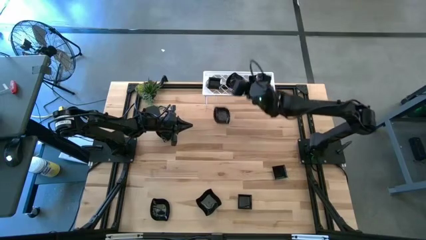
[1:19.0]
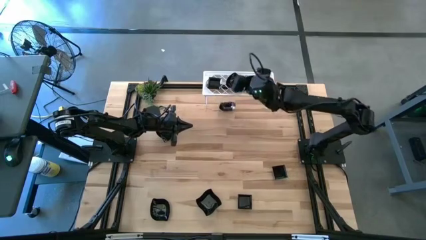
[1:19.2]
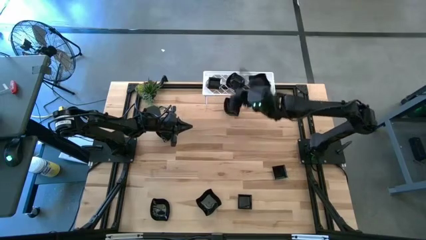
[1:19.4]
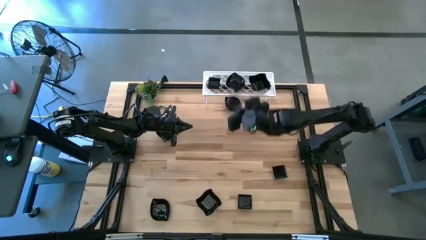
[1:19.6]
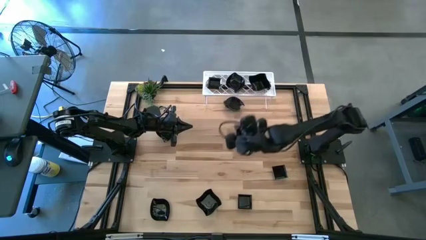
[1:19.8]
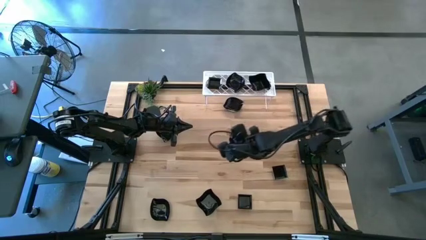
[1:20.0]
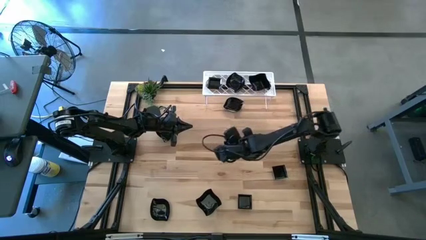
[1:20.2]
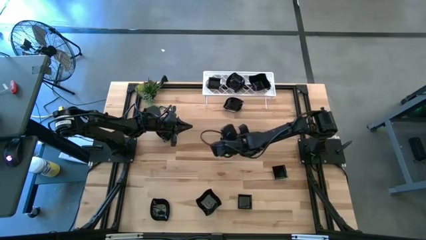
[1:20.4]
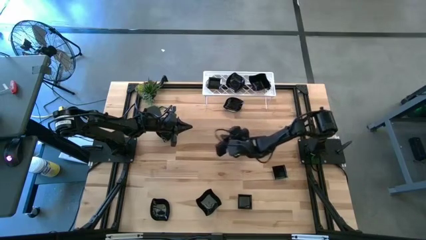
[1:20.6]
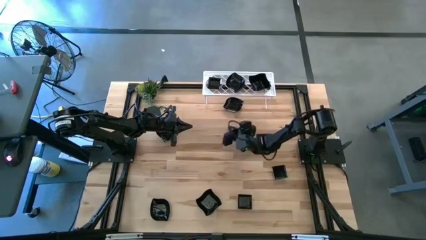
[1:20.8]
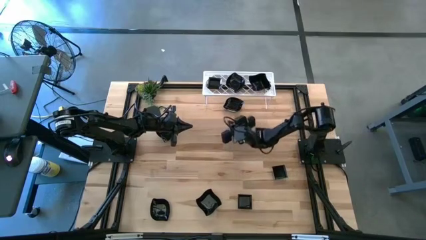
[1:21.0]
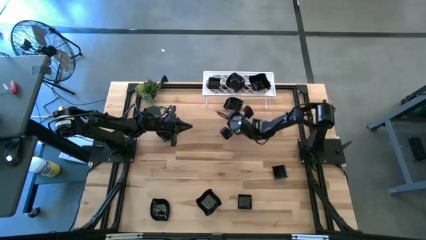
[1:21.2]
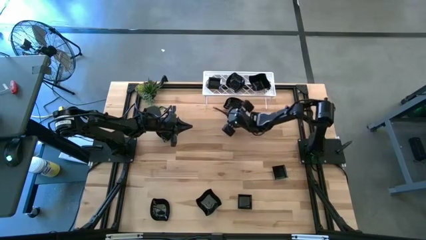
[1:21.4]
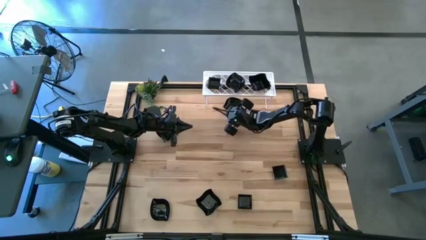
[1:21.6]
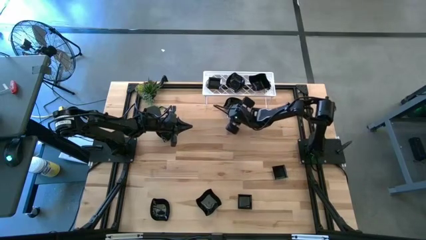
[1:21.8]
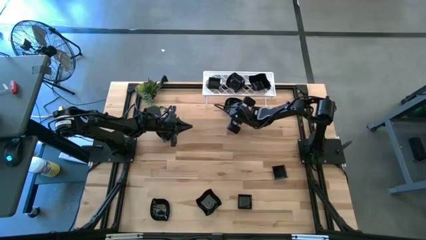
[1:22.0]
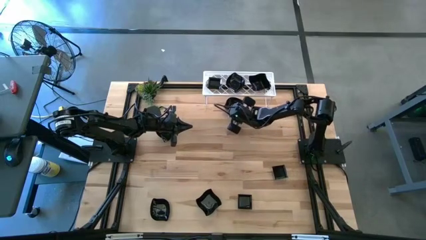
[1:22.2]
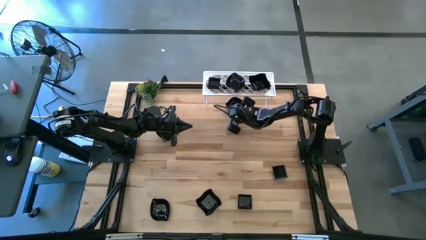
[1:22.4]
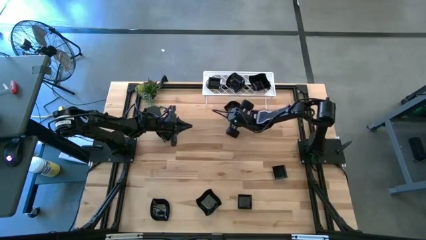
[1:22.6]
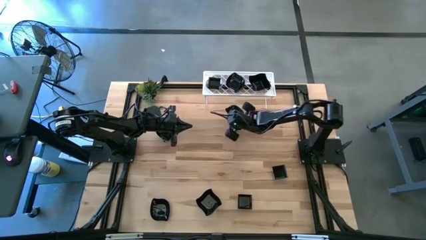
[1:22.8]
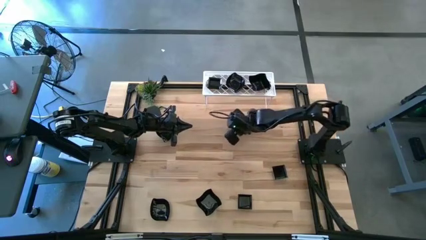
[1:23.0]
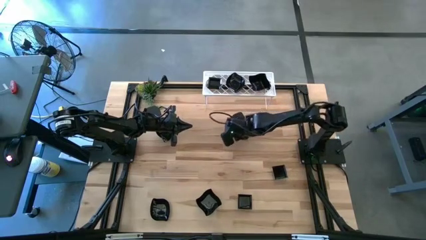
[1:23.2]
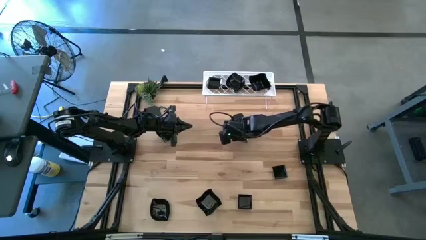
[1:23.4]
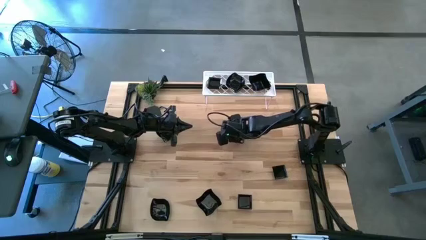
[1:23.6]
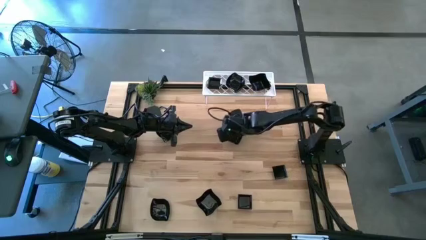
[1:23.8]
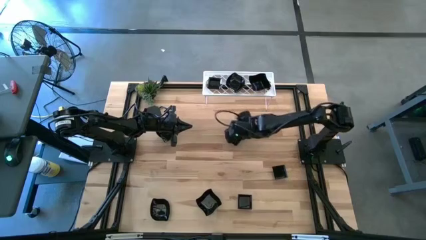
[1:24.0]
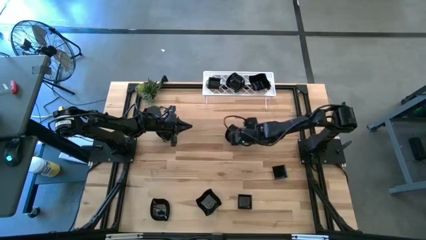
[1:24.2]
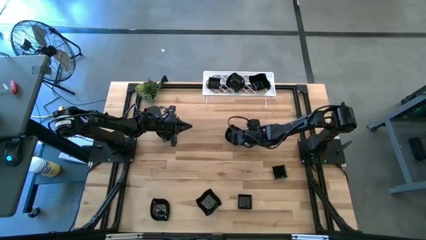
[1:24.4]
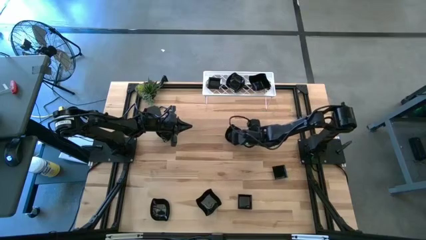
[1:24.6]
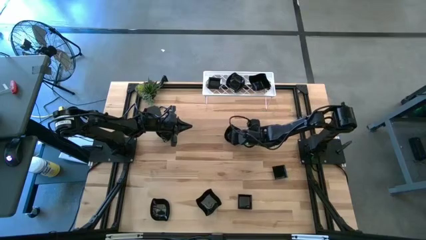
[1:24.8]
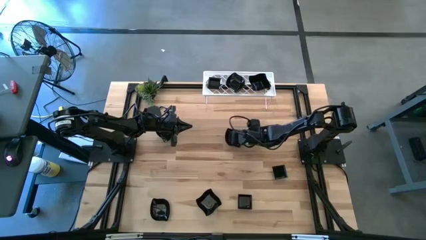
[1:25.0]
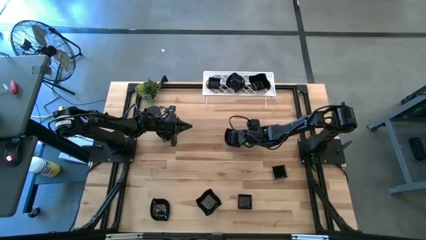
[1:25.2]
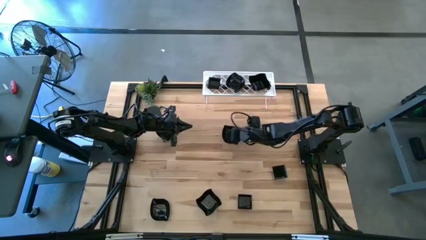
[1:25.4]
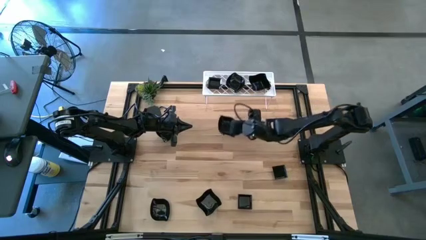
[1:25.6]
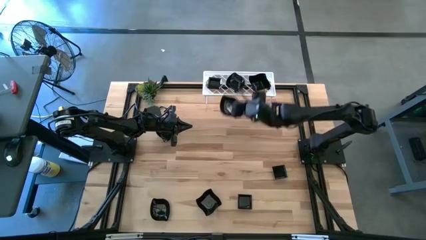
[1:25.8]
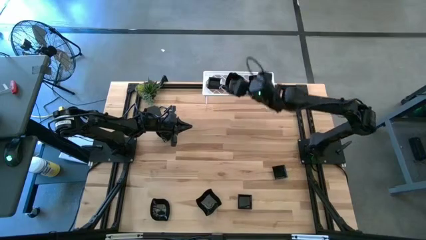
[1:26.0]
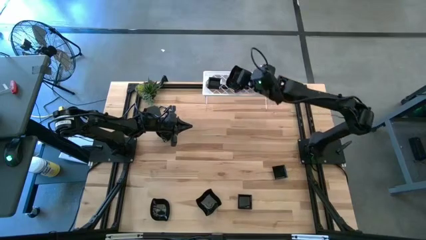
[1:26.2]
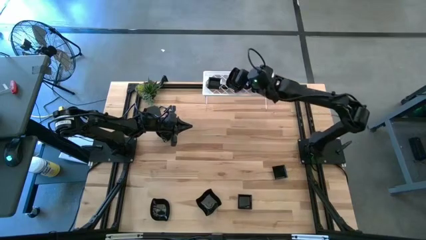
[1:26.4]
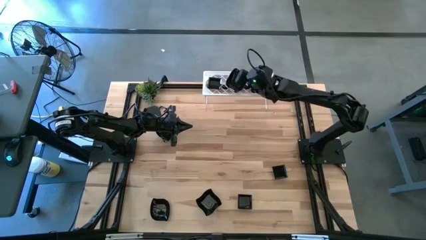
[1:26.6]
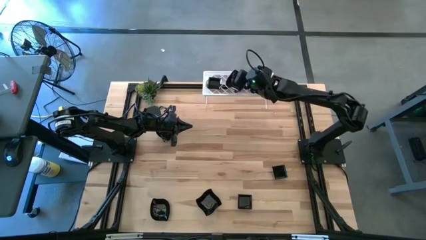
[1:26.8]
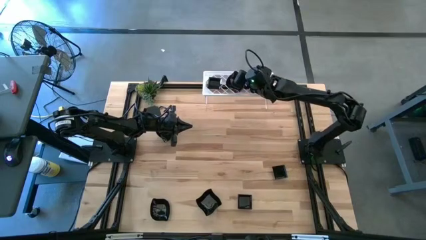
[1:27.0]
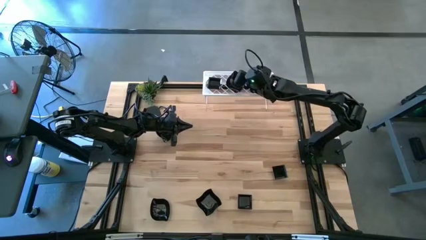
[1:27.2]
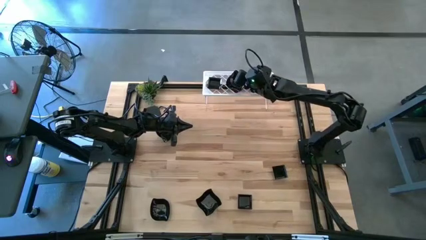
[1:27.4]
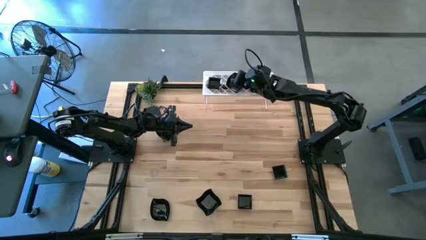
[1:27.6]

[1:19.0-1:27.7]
Task: Pick & Place Mini shaped plates
Stack the leaf shaped plate on top of the stacked leaf shaped plates on the shelf

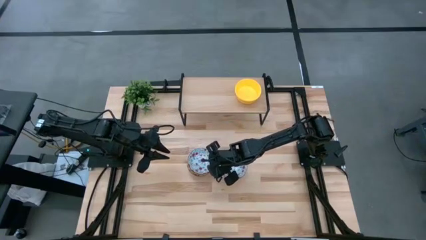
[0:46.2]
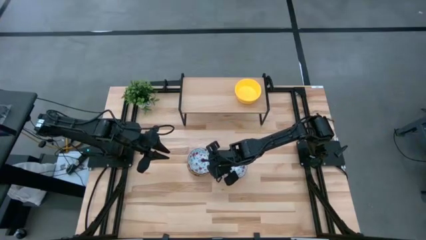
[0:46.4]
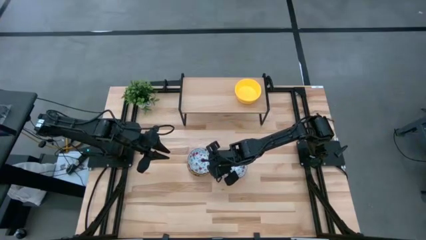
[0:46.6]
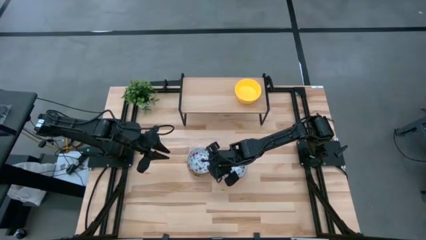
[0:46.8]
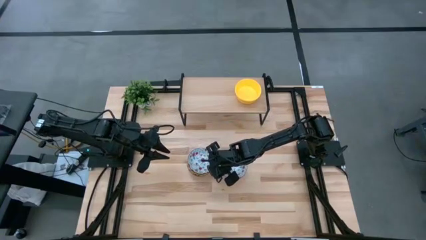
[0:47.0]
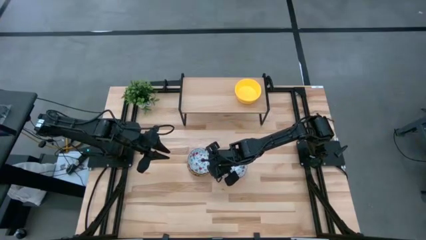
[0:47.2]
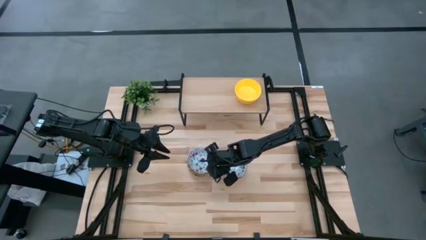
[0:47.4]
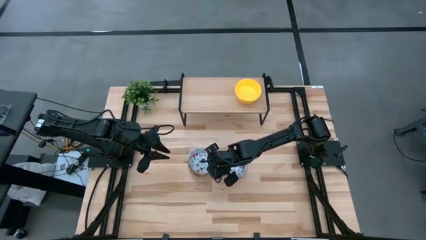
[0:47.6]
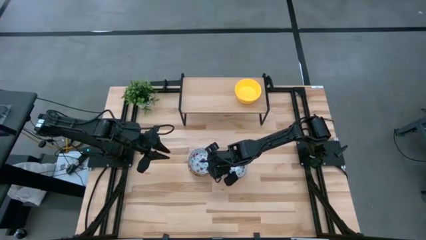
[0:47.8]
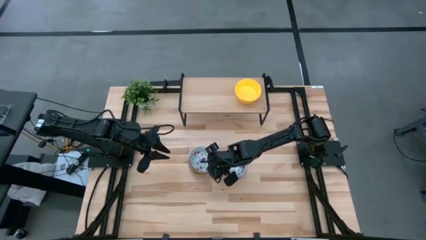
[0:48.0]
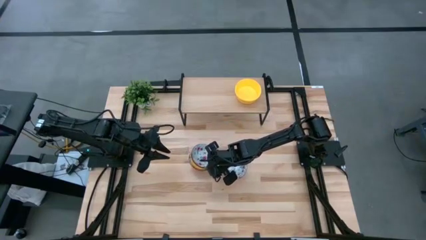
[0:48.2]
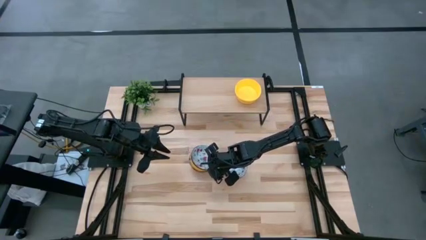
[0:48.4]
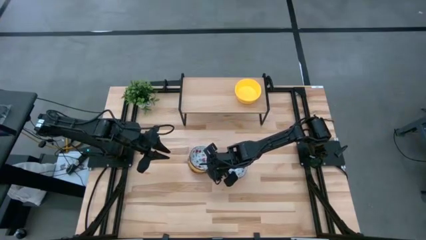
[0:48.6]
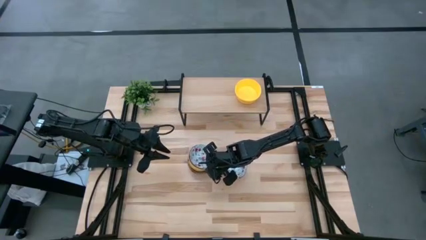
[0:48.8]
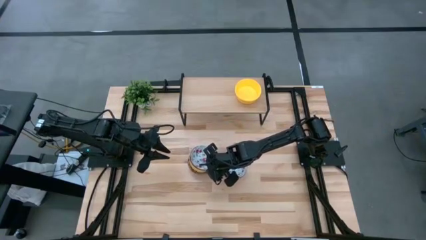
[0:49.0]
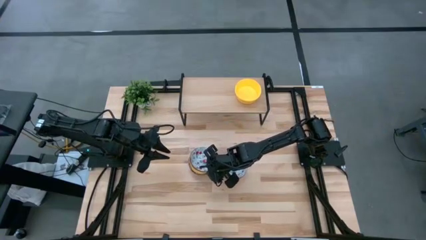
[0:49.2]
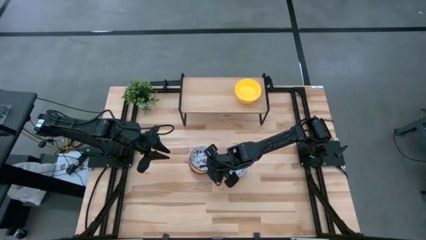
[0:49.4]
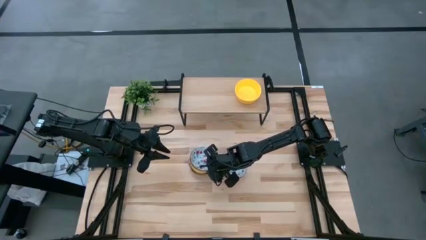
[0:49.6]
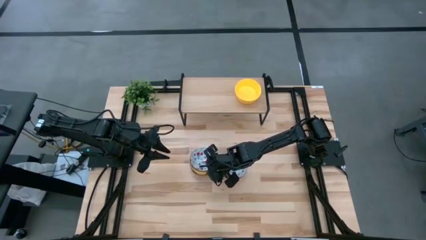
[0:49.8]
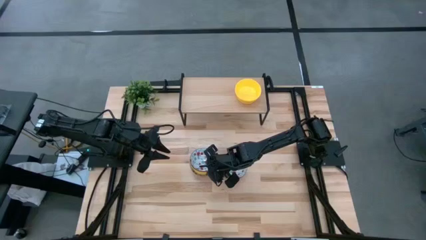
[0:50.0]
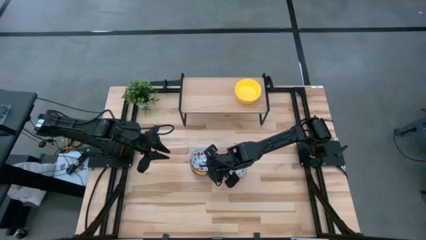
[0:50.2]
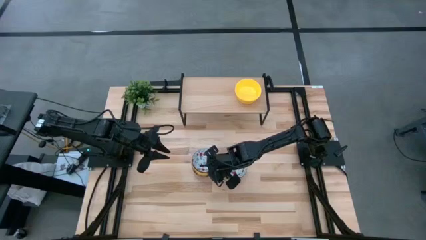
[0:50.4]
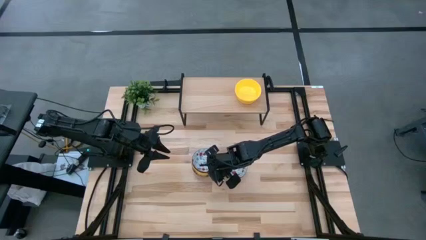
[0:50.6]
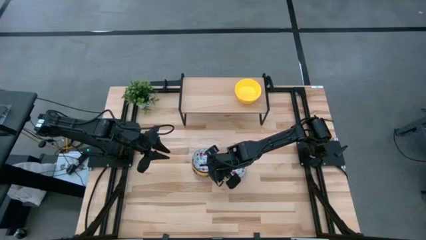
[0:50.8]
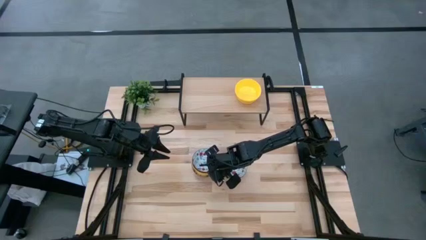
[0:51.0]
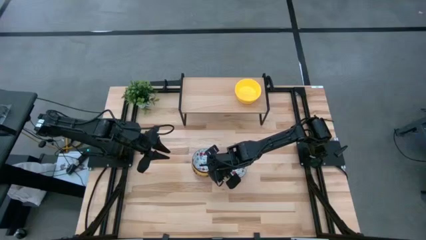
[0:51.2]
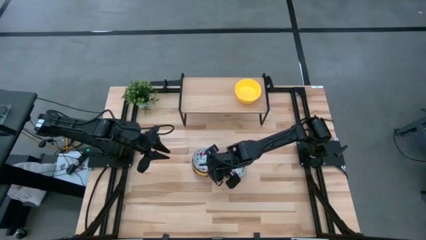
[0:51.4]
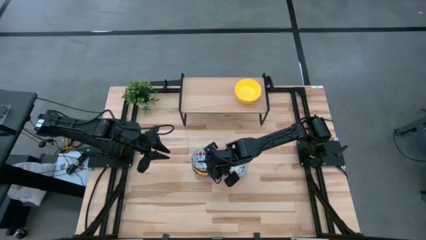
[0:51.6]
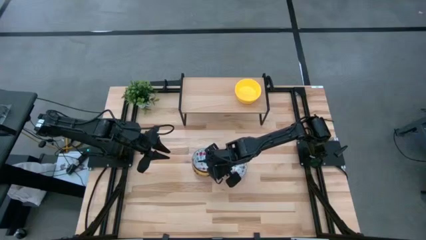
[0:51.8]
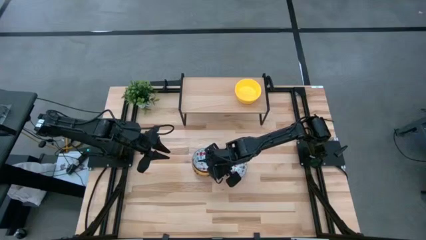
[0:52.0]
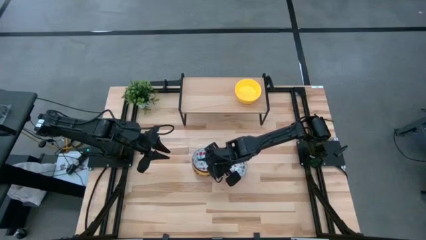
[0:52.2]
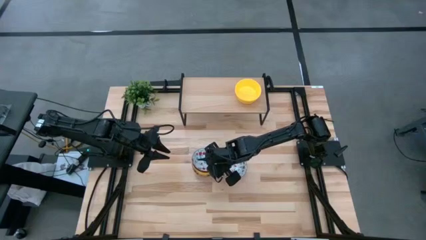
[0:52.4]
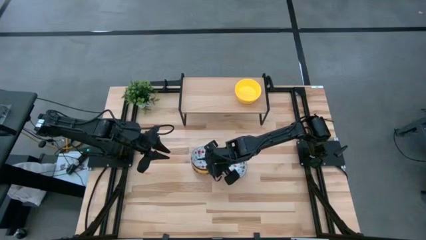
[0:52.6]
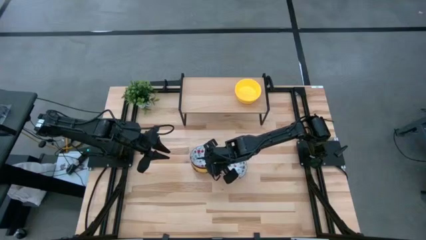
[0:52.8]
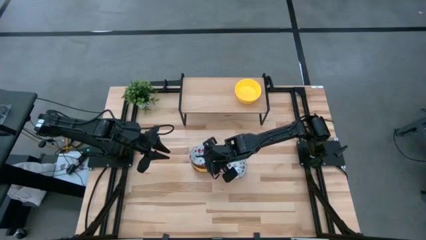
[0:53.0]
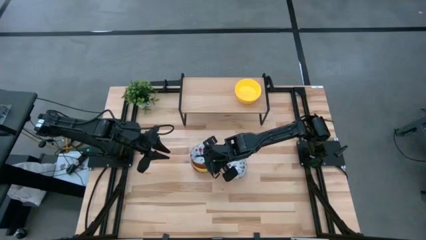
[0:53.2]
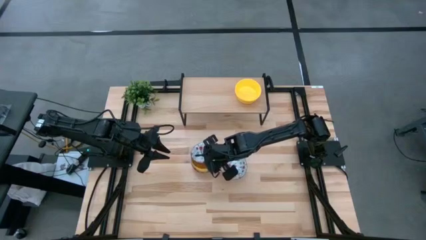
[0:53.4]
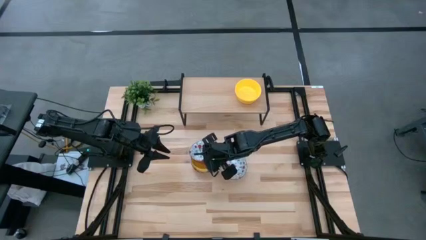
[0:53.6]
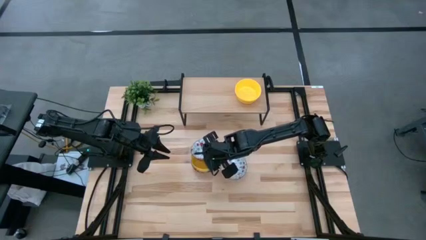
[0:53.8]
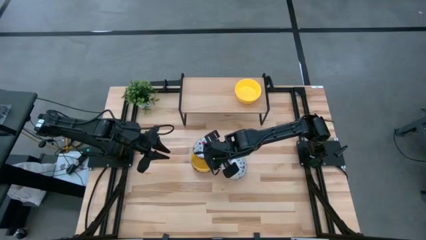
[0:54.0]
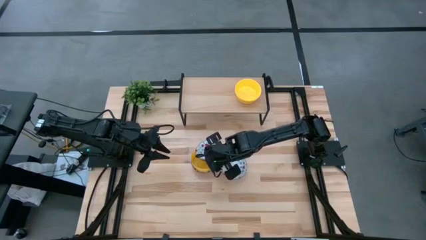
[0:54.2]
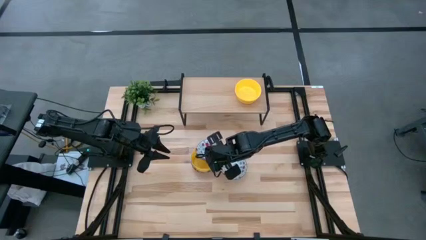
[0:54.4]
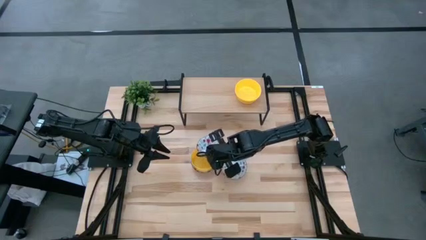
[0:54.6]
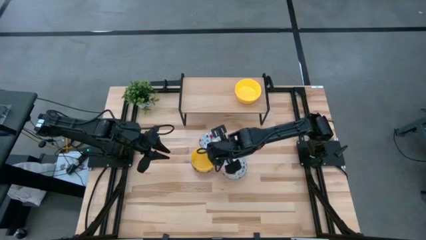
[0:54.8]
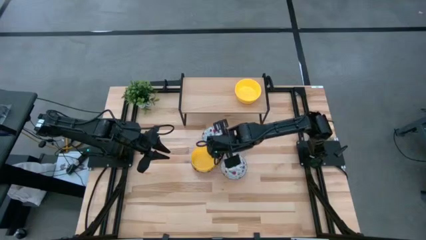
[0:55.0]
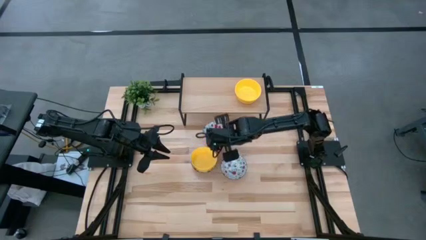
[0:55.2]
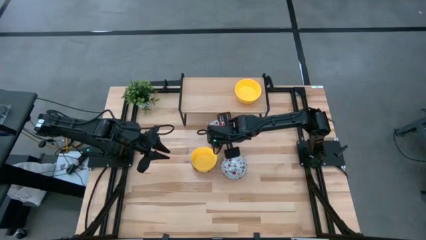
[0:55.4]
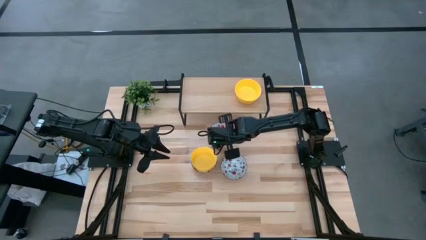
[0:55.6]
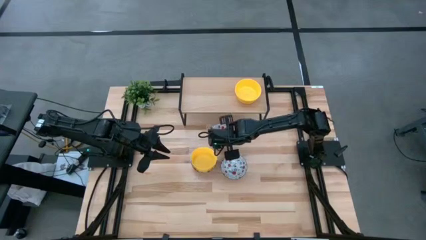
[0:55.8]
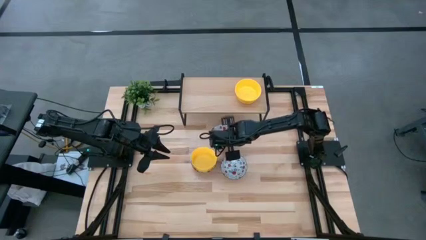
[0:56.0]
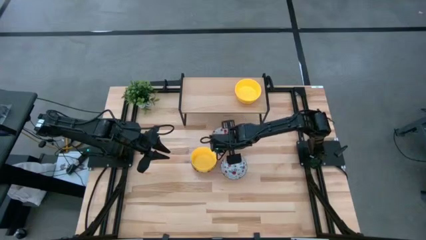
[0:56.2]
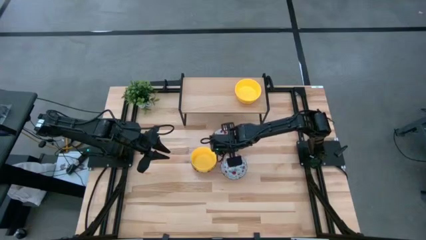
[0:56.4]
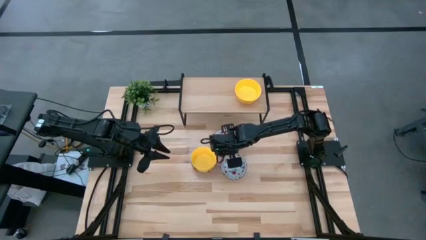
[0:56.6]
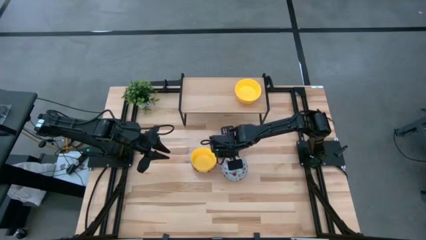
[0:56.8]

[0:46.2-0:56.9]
Task: Pick & Place Mini bowls
Remove the red bowl from the stacked bowls
